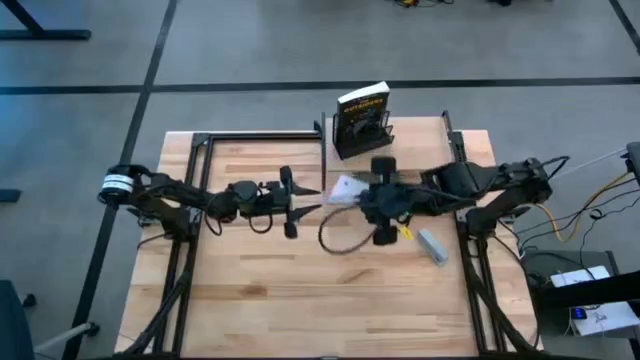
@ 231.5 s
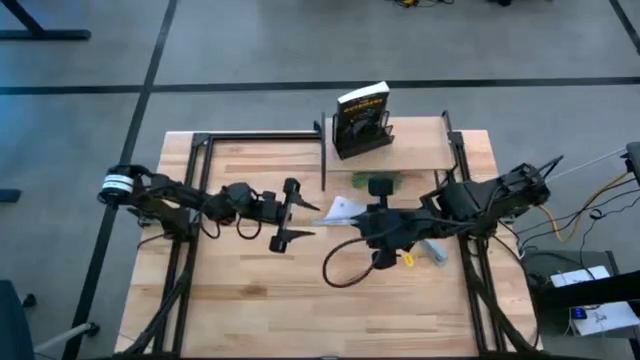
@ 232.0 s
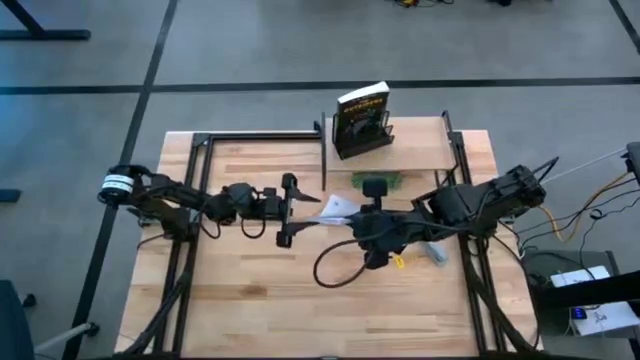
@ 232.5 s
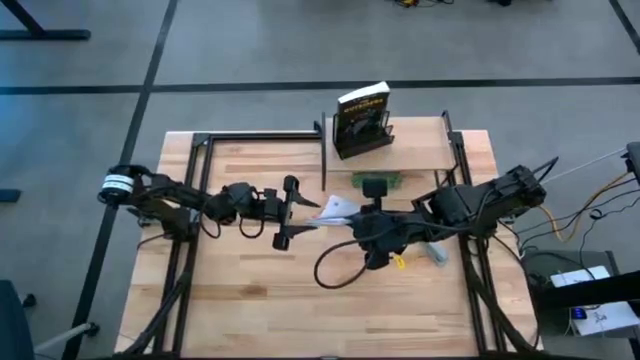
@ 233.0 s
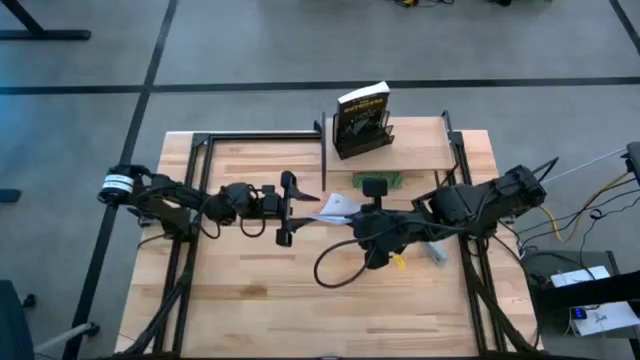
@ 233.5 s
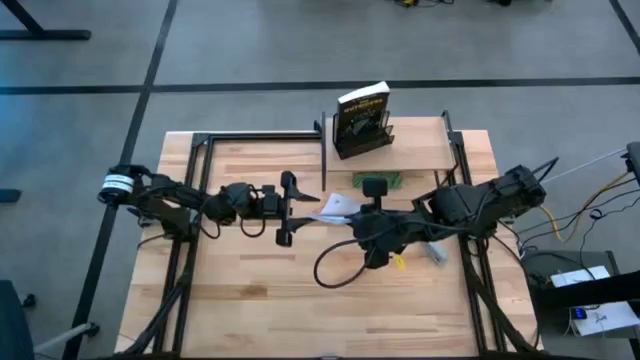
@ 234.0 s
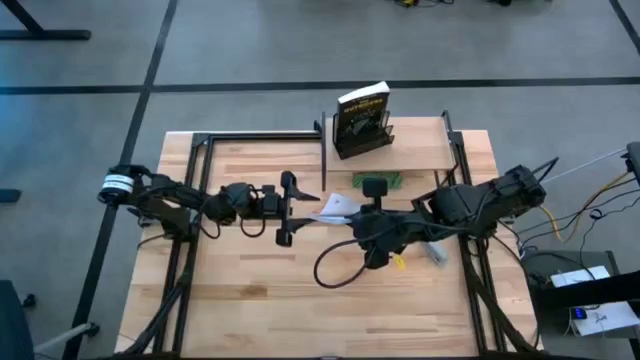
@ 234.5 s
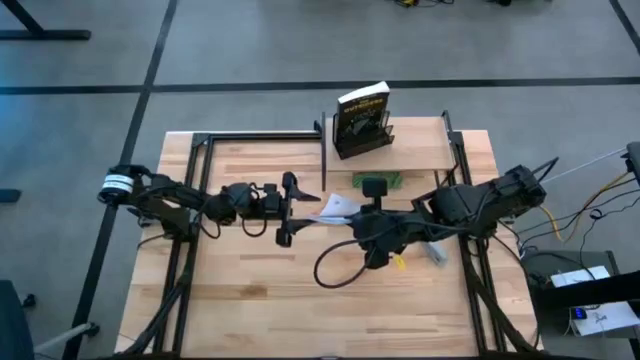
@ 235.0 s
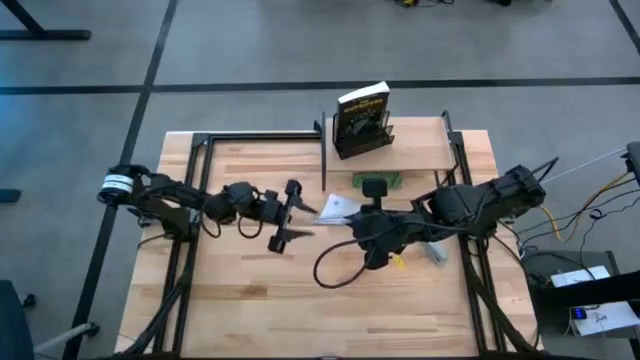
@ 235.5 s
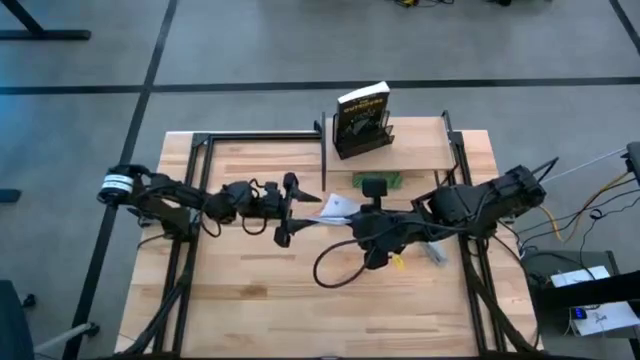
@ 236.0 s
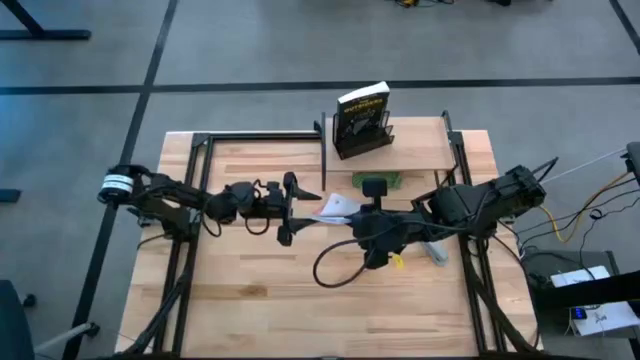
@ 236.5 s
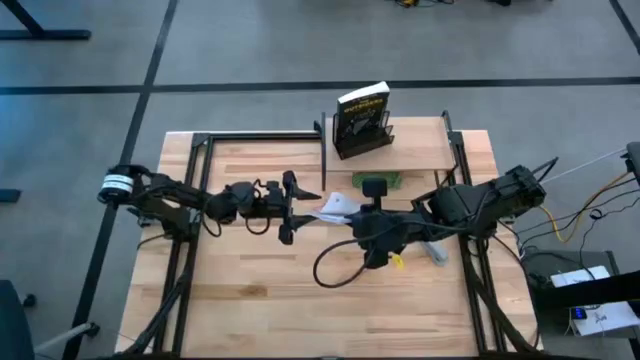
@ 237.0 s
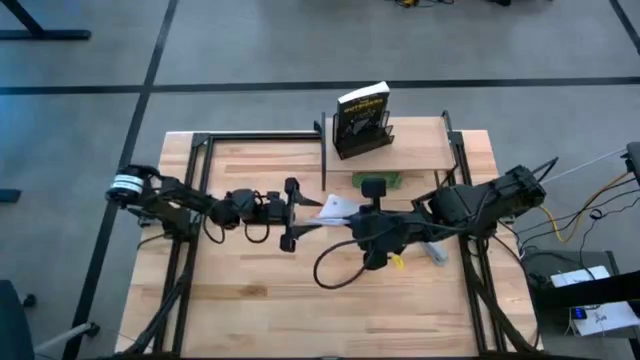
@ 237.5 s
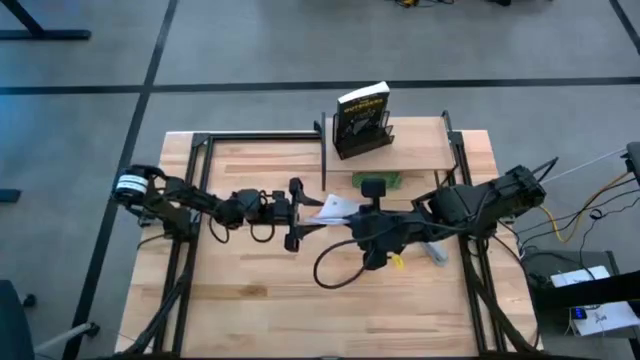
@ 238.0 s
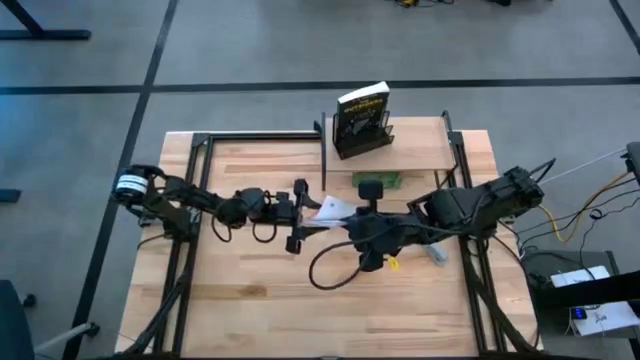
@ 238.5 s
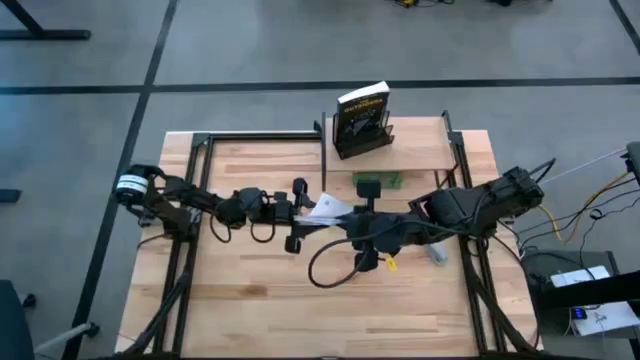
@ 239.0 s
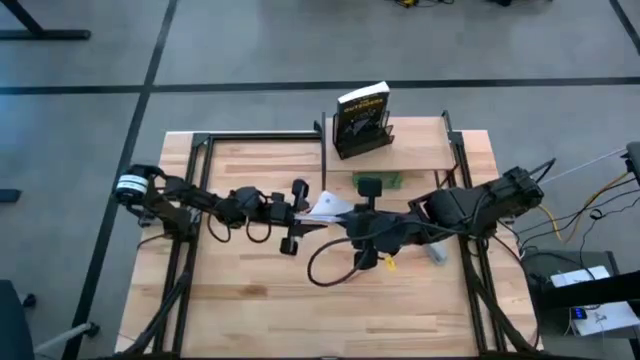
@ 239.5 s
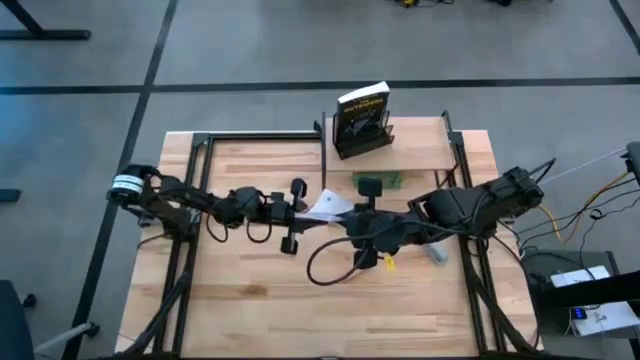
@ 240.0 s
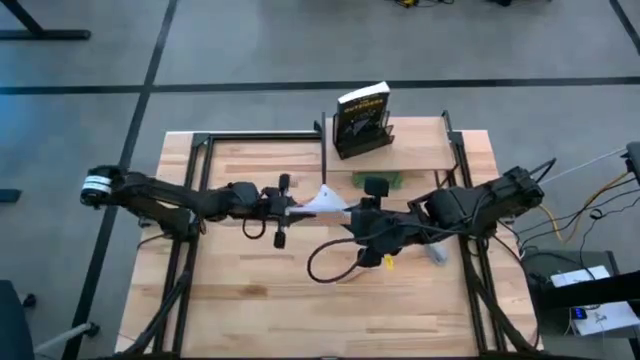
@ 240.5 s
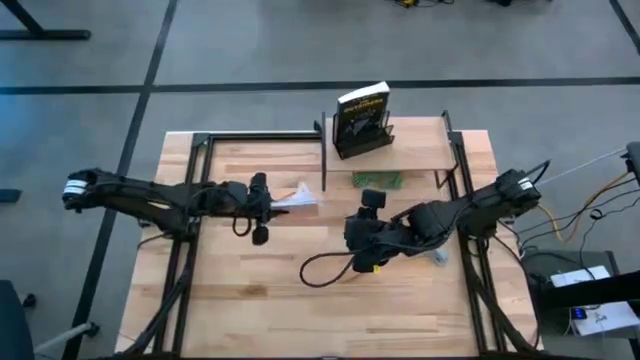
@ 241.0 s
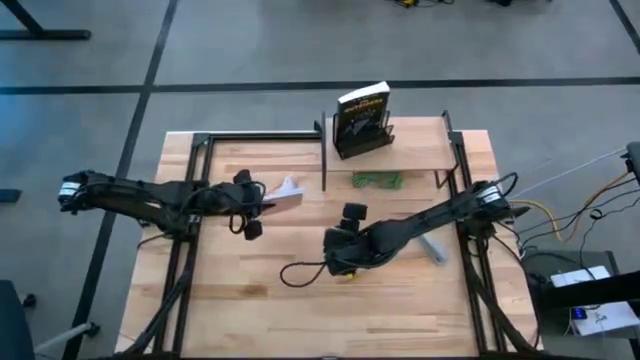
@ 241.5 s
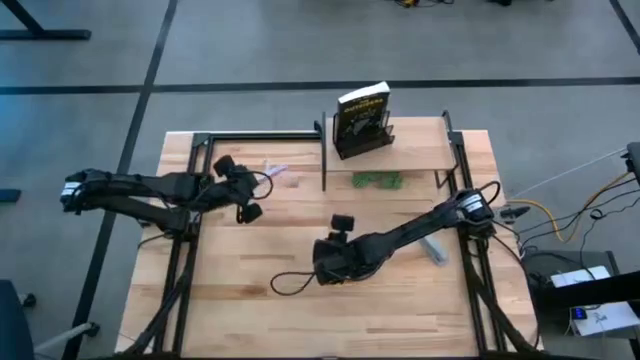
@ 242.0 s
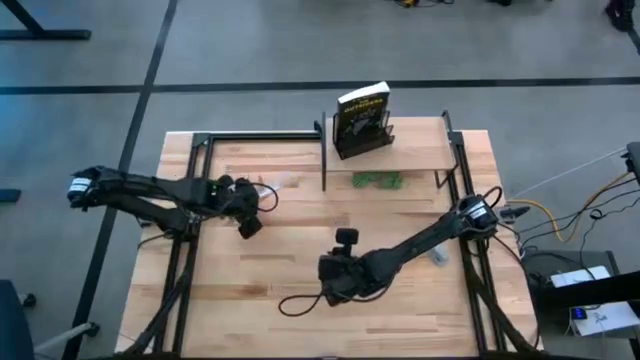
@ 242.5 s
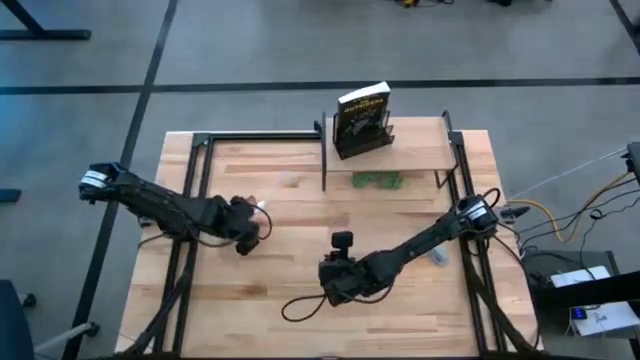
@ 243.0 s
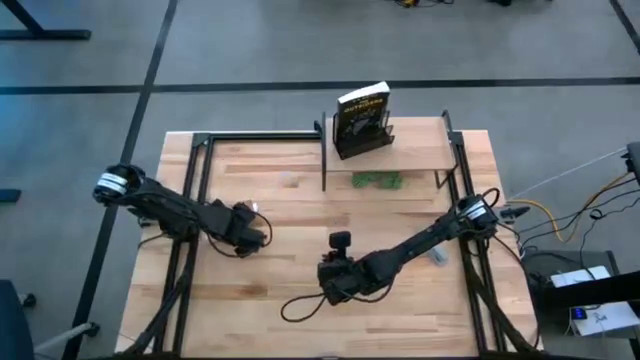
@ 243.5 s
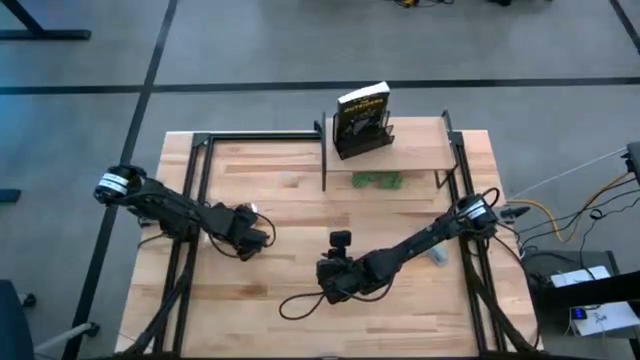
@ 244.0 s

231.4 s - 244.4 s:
Task: Stock shelves
Remove the pink notebook from the black desk organizer on the shelf

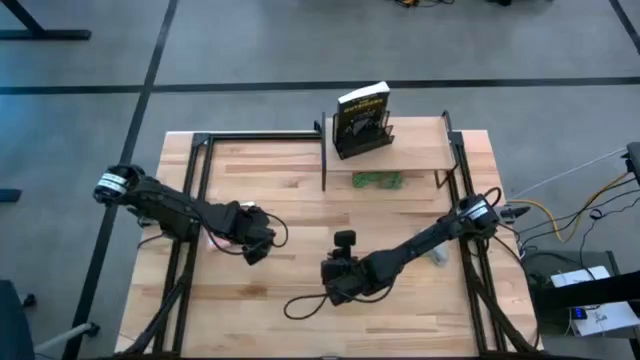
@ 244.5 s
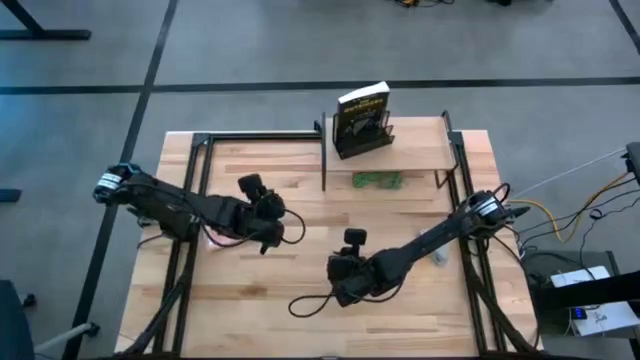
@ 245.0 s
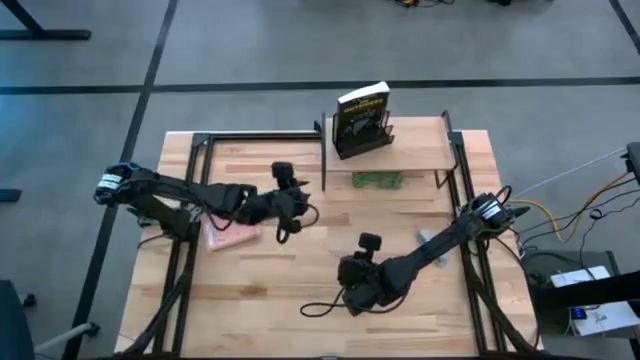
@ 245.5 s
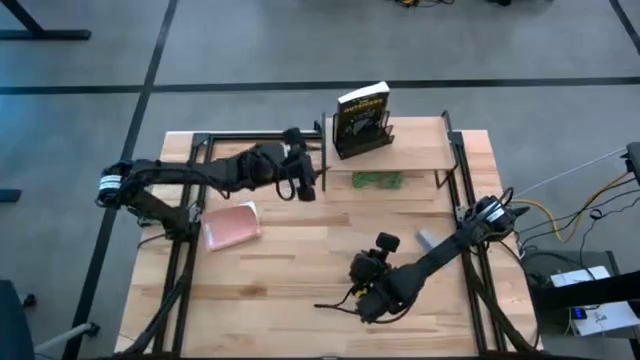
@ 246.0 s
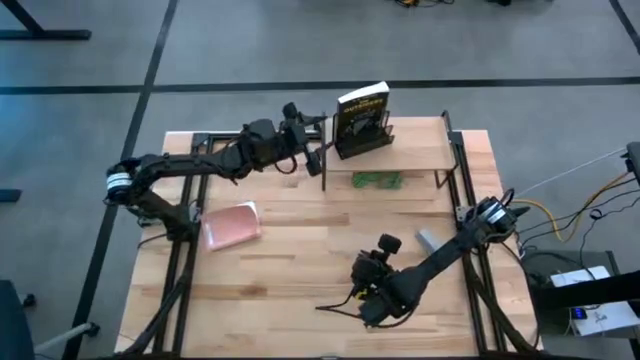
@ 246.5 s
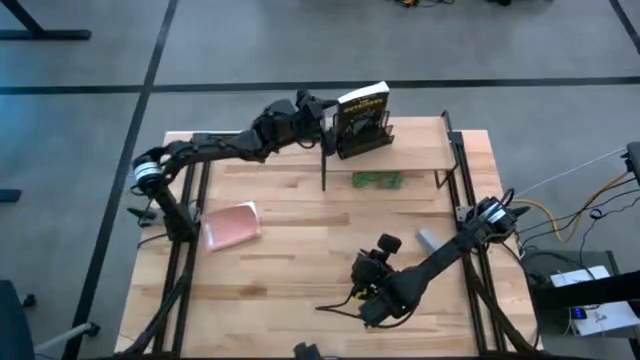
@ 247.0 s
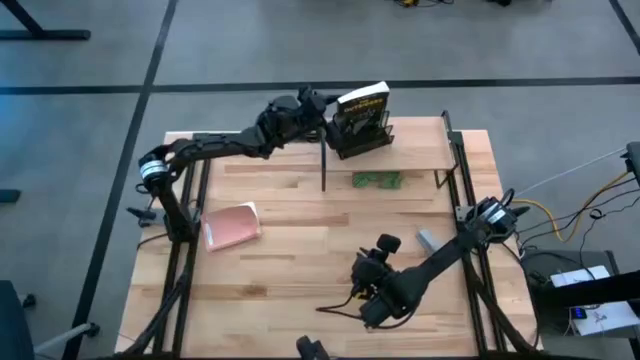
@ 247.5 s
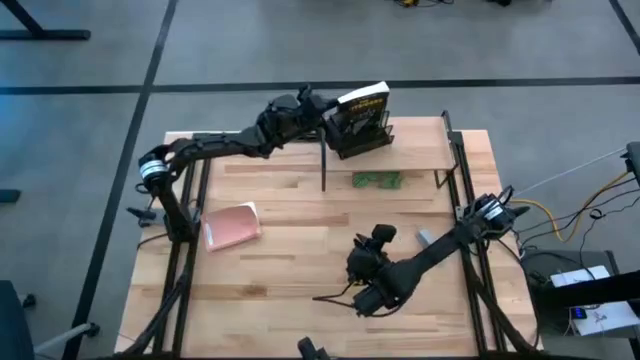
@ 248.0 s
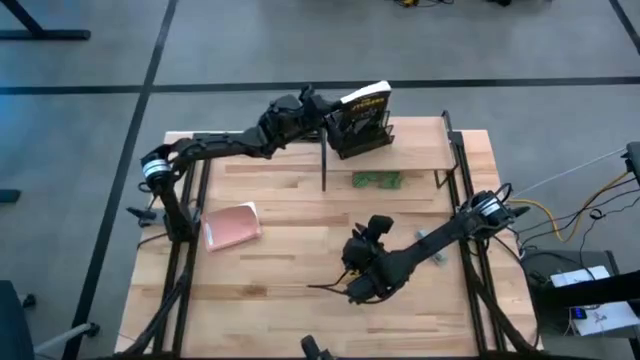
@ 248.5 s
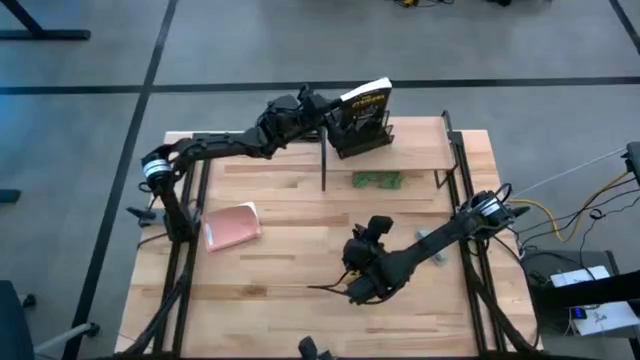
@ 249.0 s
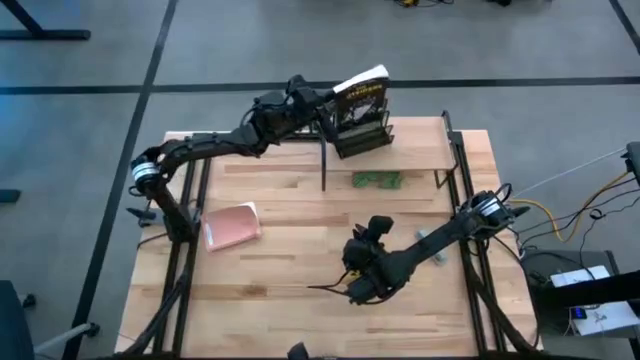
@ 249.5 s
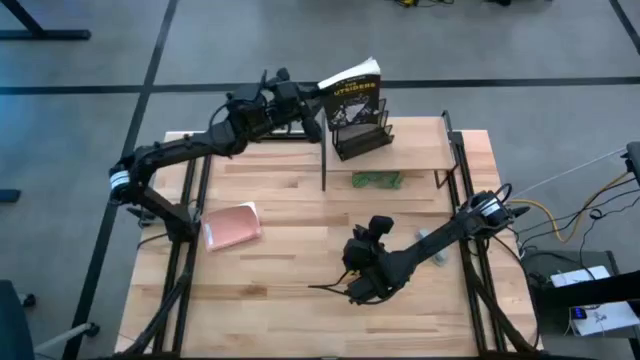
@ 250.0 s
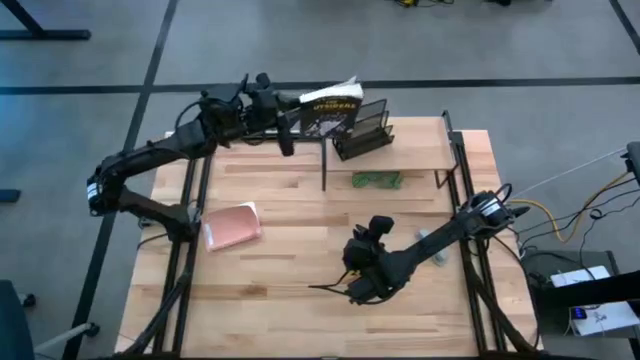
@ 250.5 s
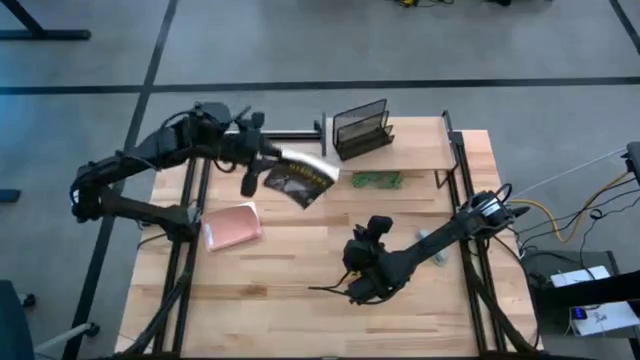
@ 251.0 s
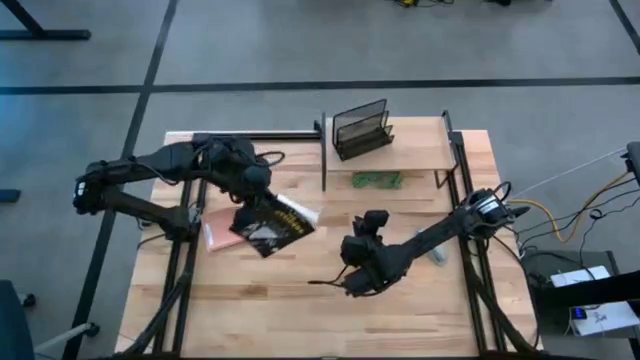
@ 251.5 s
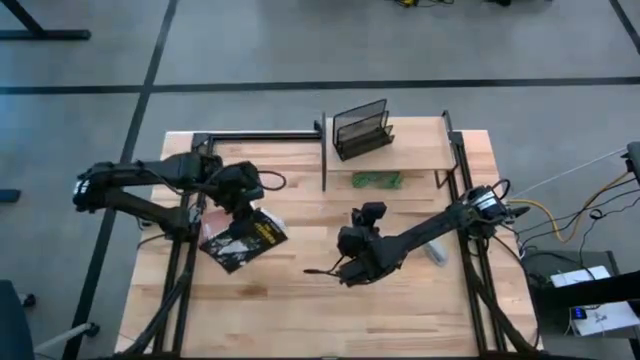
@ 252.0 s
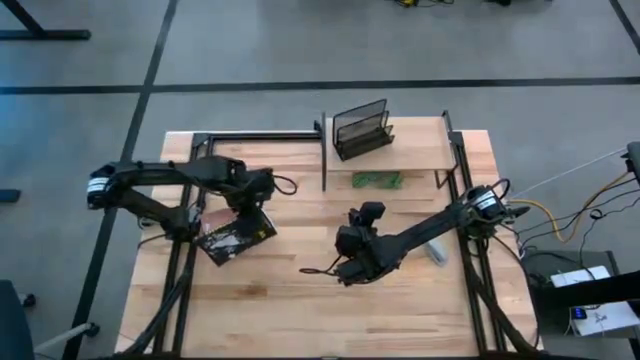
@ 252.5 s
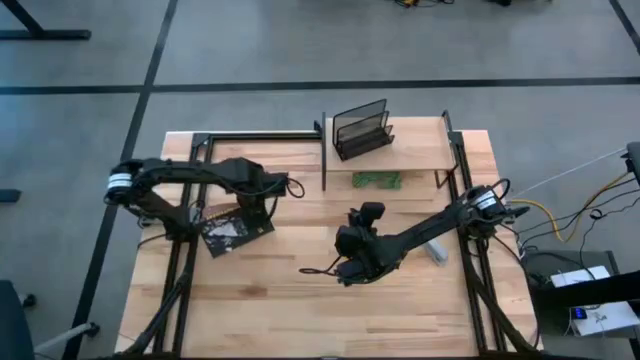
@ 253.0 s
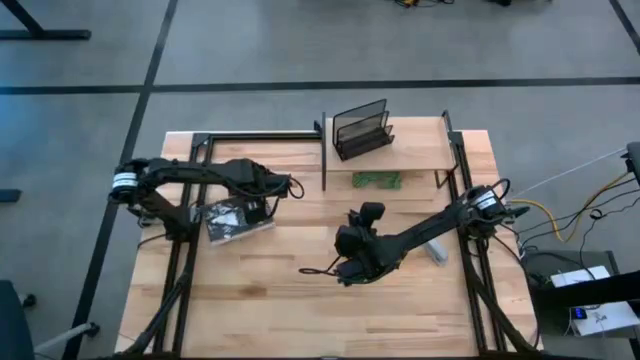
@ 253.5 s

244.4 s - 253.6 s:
Remove the black book from the black desk organizer on the shelf
